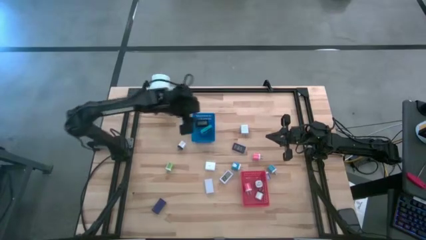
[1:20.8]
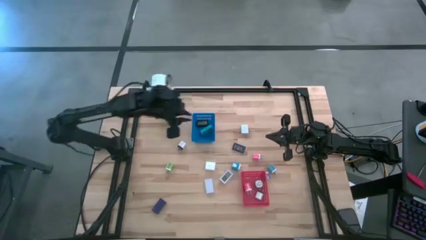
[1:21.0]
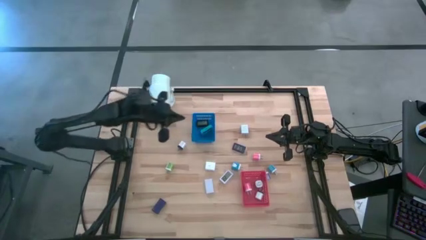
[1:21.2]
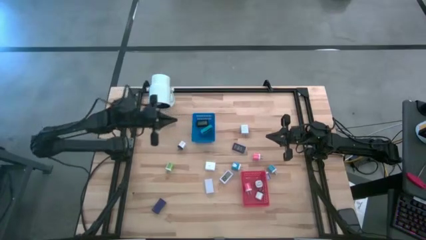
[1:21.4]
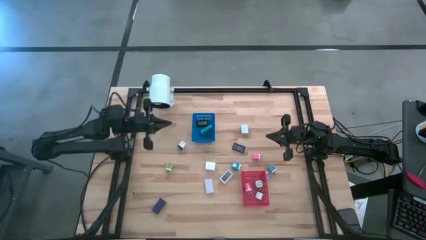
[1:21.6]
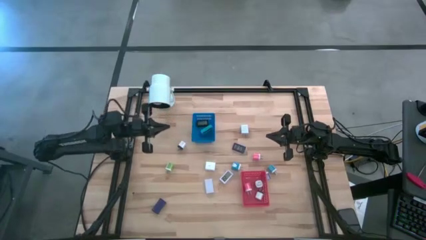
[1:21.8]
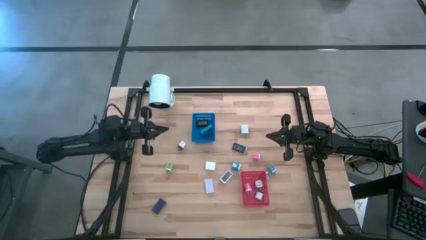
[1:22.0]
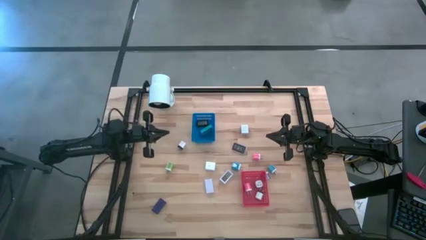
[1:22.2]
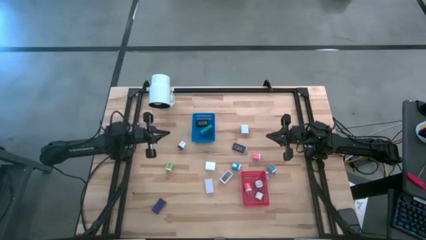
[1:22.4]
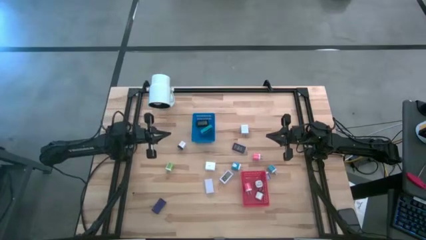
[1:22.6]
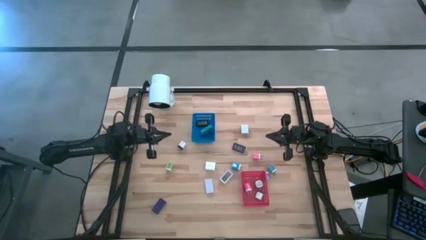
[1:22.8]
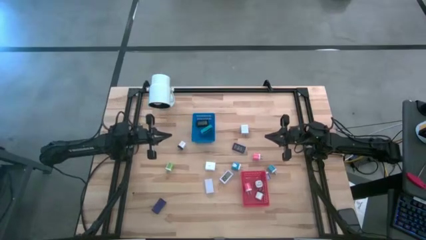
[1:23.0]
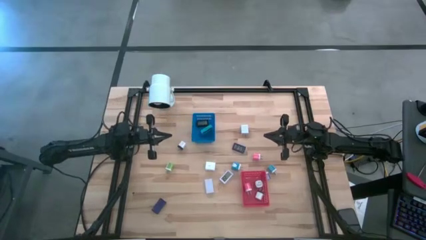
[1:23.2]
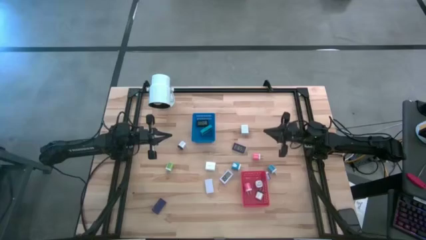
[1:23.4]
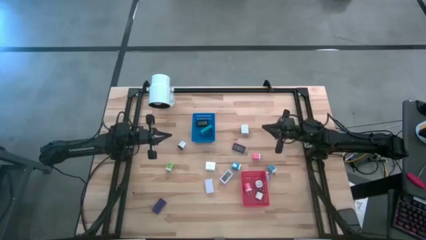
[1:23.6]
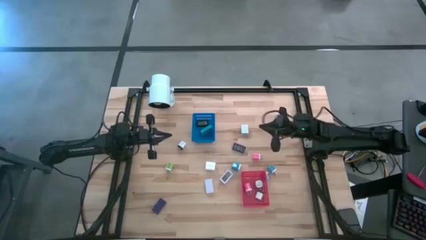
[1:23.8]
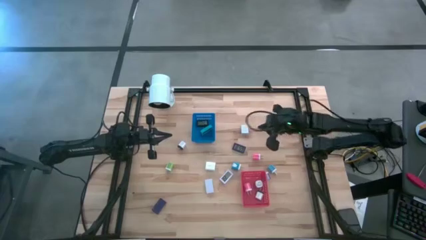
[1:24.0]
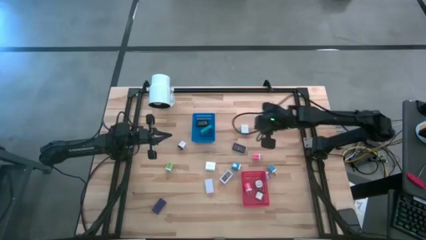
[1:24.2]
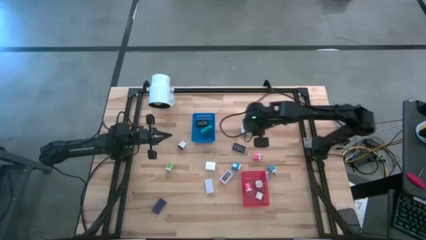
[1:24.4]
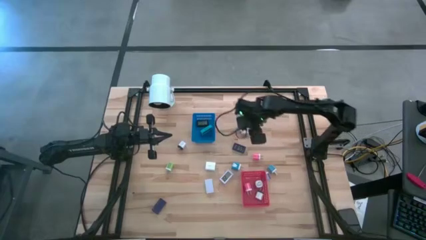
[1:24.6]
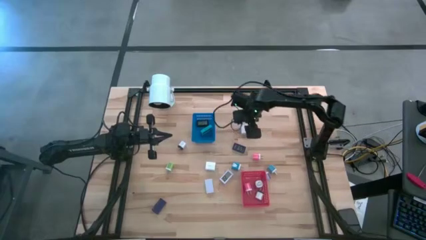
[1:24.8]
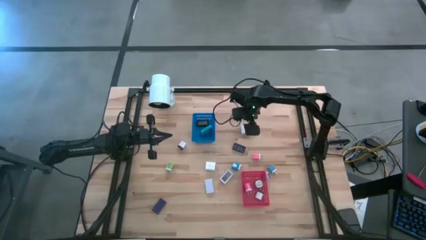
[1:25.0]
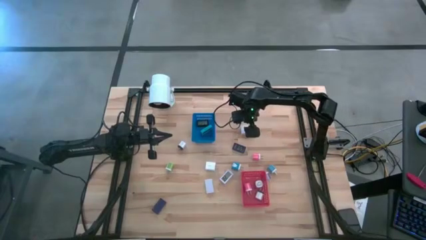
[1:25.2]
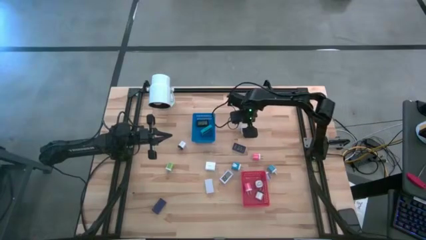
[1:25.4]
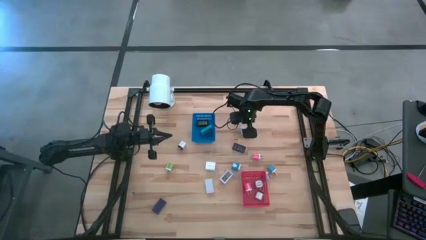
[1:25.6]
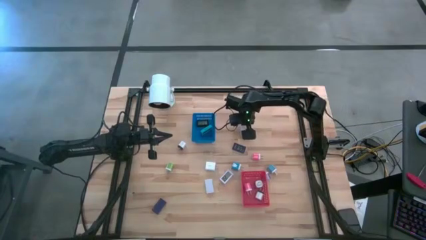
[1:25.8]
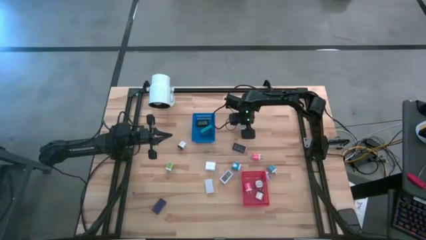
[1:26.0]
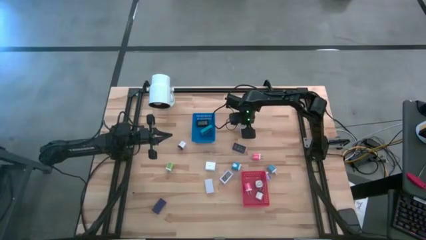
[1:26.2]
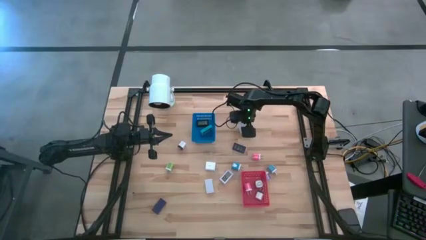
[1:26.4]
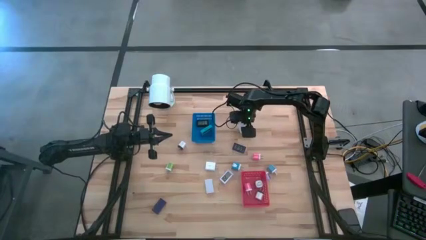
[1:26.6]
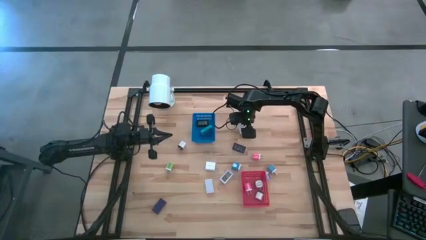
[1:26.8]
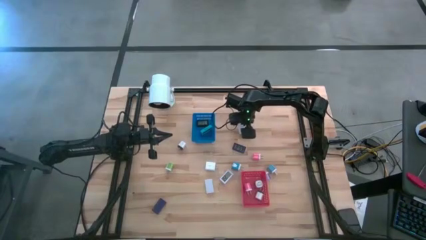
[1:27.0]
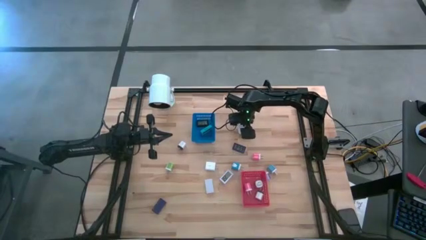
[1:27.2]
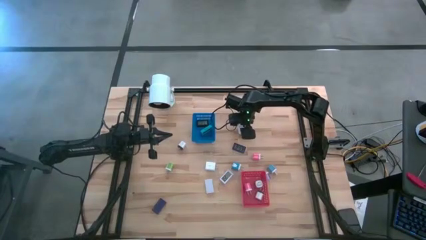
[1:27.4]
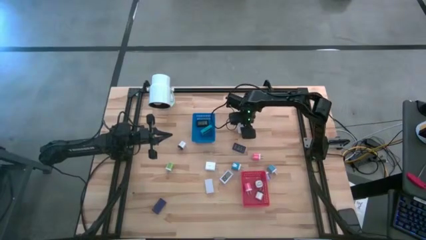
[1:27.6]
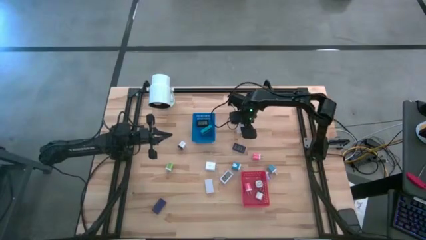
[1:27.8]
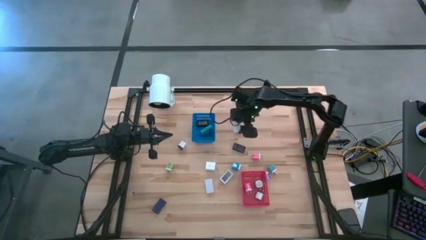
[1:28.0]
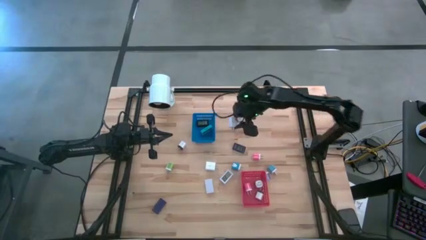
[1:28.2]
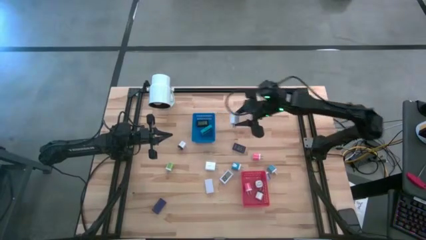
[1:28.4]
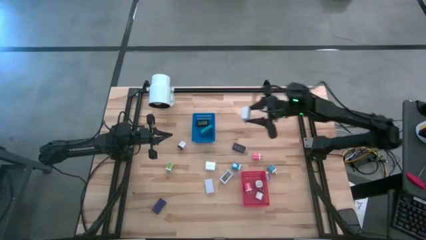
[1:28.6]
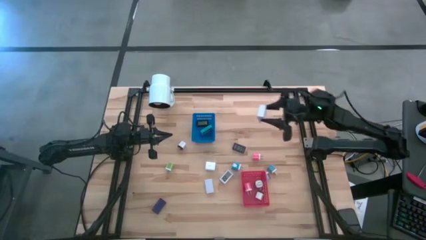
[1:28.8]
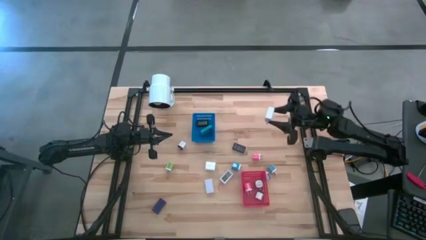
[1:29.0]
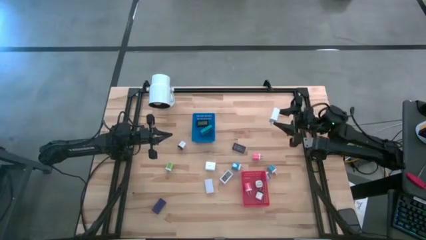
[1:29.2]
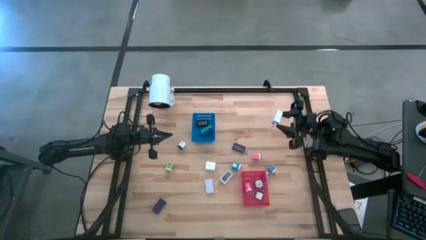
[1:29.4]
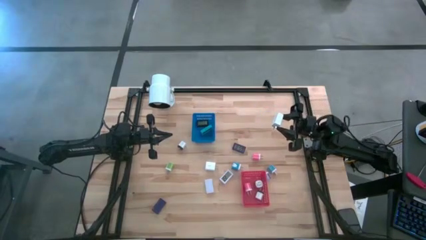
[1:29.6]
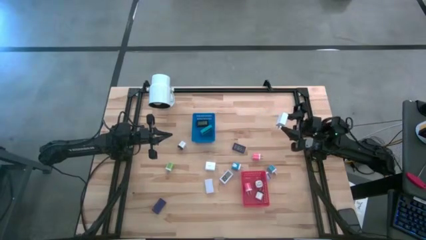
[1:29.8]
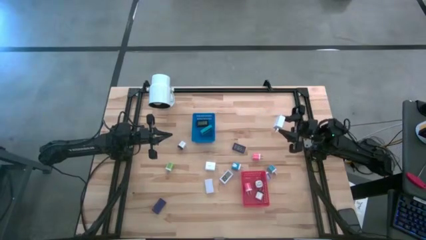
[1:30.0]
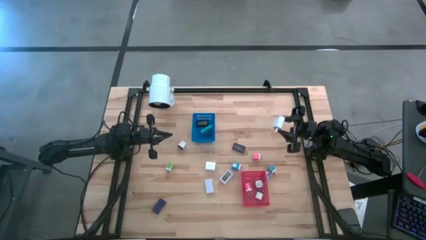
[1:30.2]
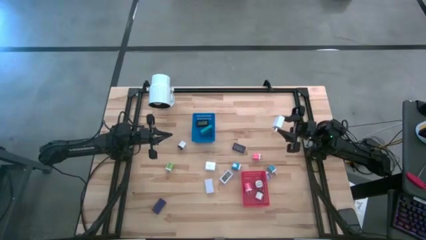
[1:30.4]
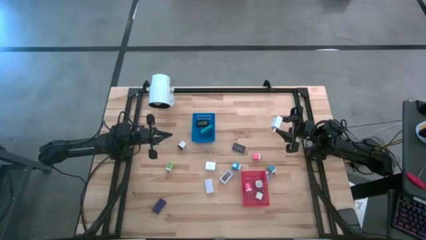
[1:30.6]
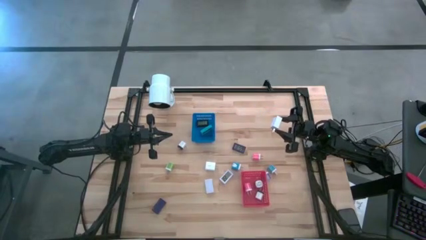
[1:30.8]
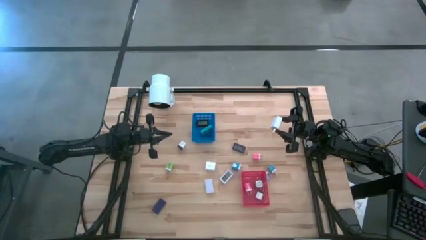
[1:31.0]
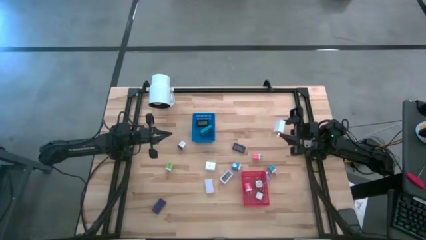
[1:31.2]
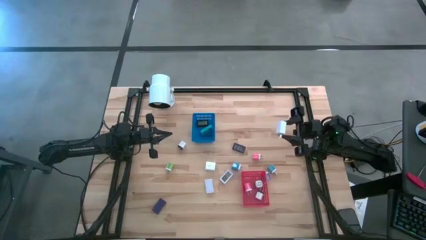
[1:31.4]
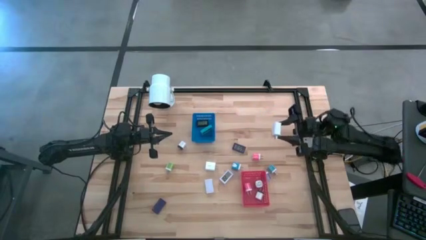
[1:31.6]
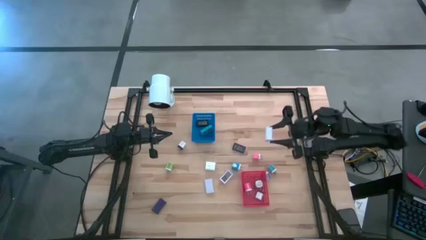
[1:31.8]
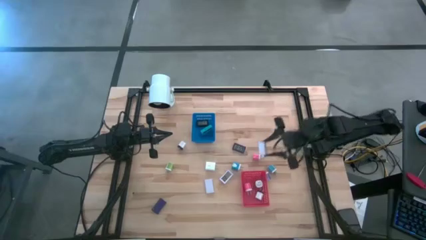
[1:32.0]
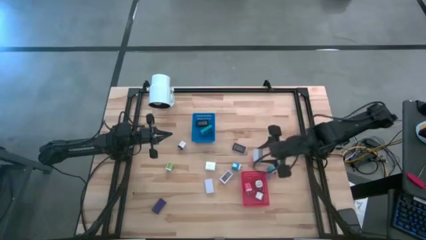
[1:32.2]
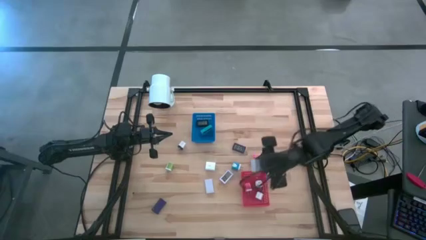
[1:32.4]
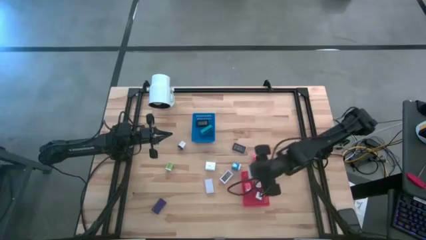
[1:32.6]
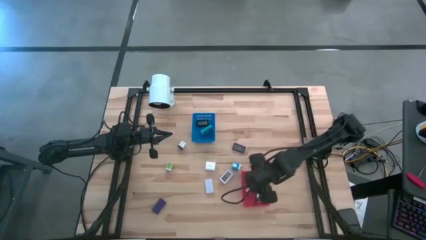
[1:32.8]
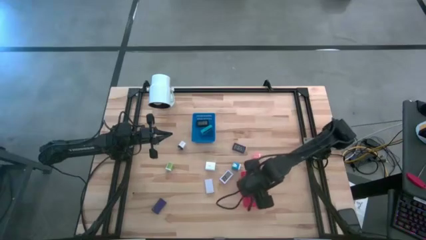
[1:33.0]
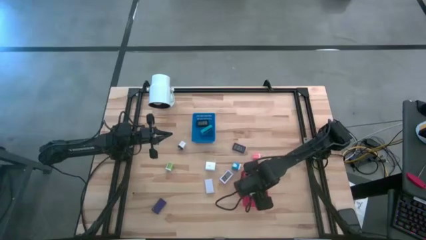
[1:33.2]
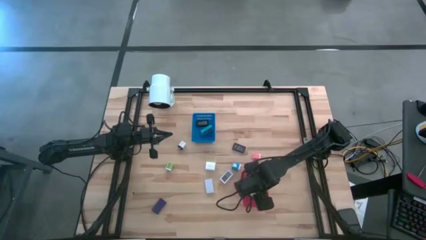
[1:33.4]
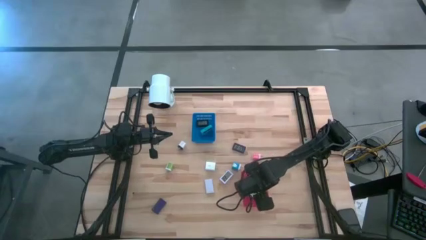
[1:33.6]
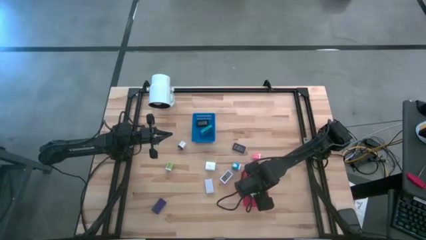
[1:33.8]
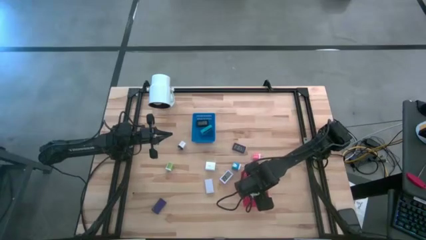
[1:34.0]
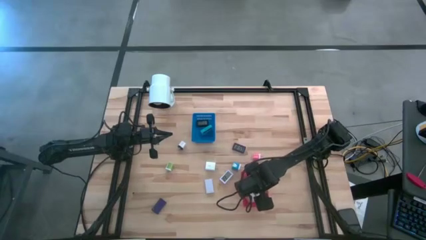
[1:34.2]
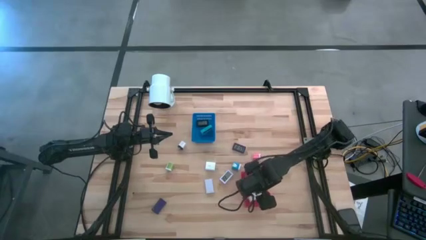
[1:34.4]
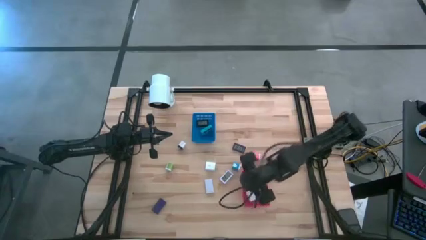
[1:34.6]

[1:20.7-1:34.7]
Task: Pick & Place Office items
Put the right white charger adapter into the red bin

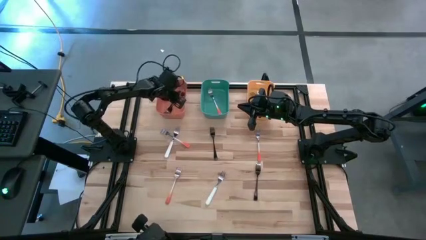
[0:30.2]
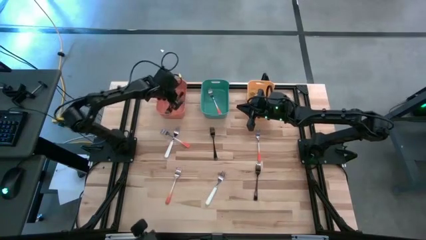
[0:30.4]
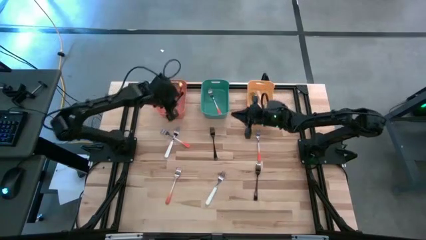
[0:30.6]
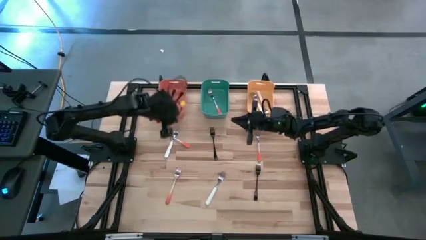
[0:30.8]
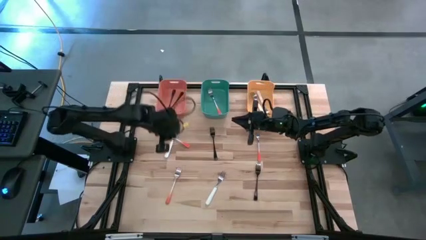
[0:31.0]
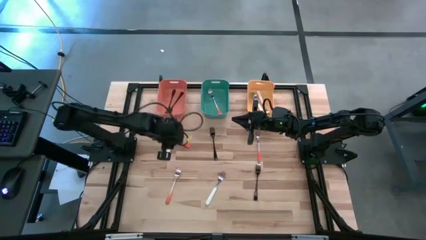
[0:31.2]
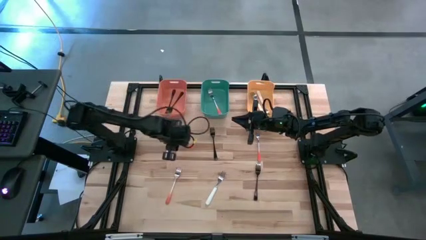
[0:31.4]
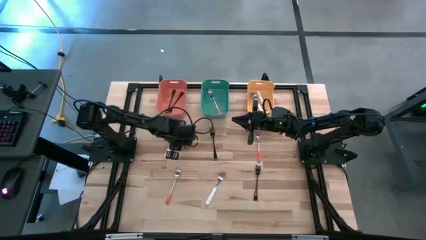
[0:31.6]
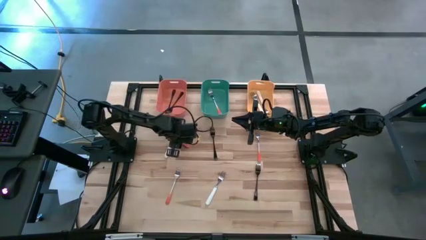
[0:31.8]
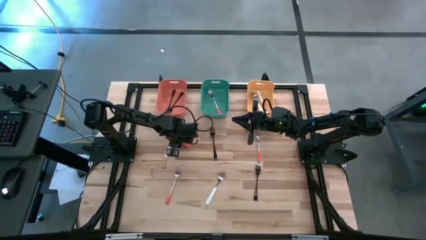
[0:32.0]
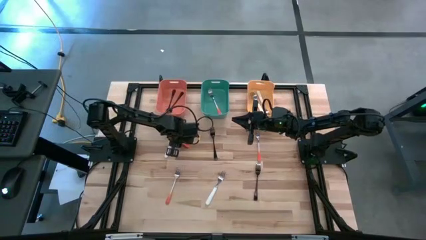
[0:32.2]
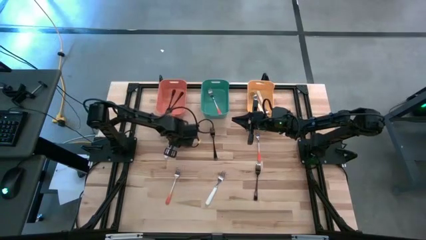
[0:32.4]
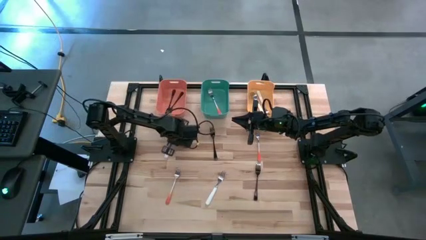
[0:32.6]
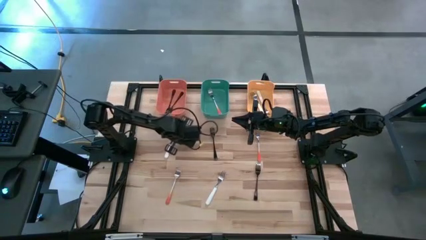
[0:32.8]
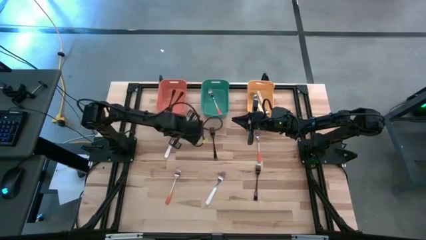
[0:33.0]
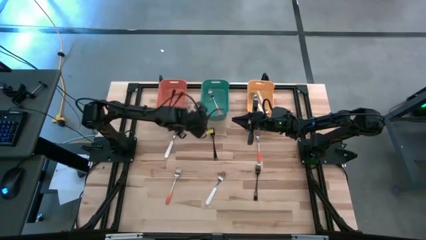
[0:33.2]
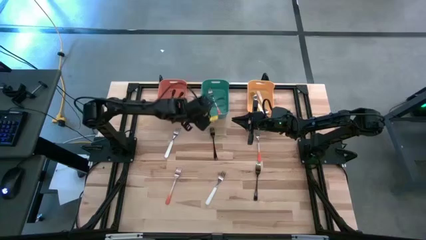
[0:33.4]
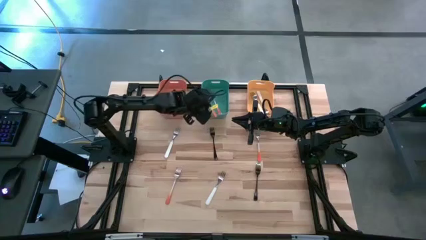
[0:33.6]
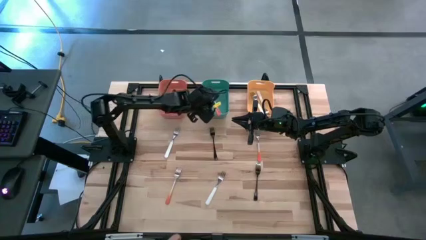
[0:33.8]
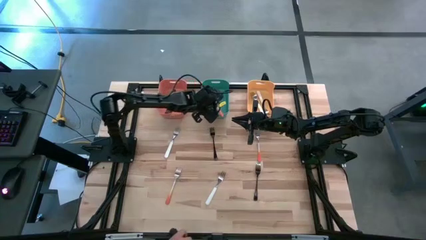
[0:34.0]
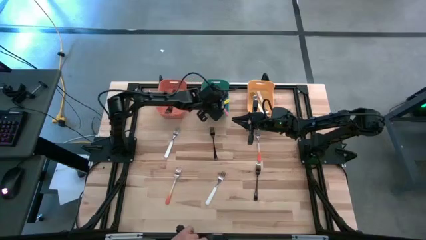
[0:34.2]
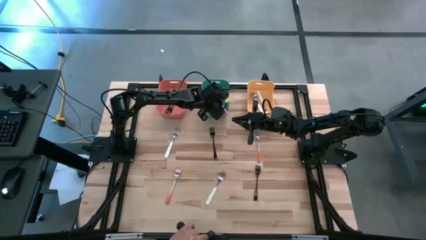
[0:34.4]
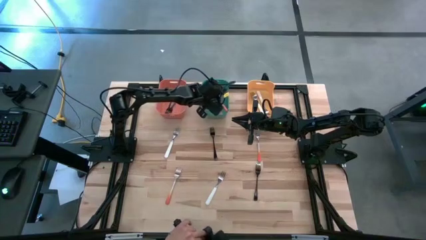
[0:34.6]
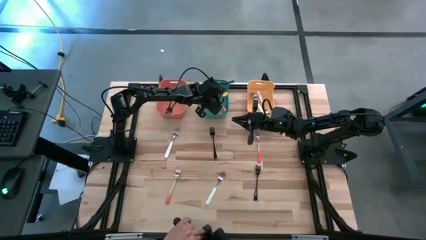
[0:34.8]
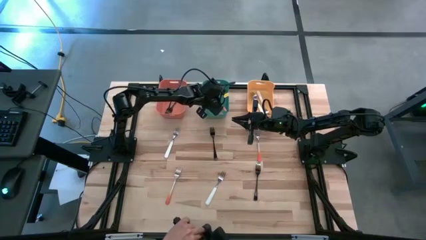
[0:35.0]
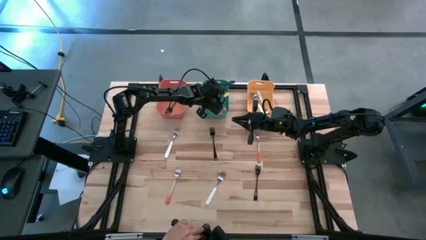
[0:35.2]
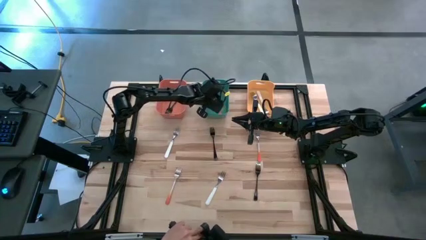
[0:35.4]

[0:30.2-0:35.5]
Task: Sort silverware by color (type)
Put the top left orange fork into the green bin
